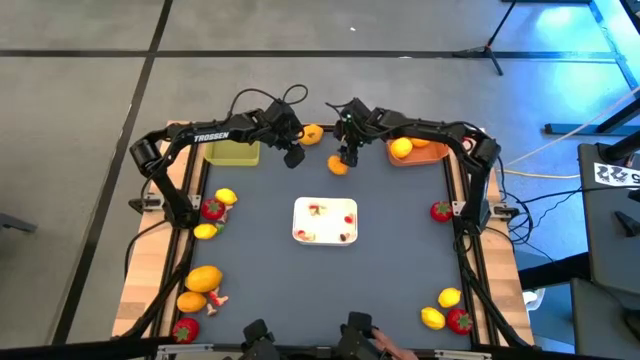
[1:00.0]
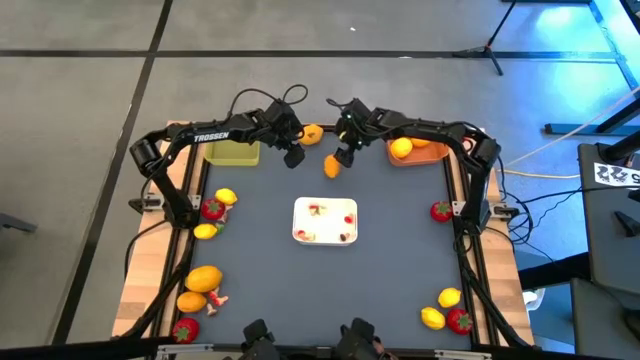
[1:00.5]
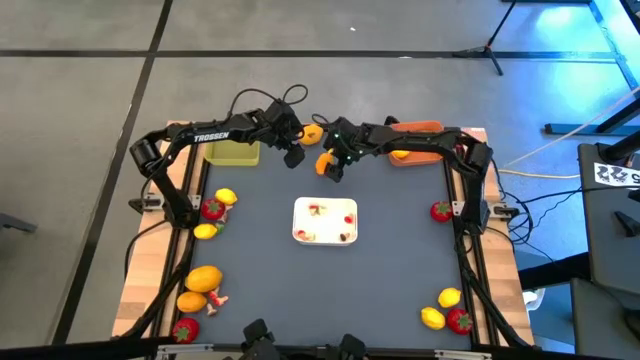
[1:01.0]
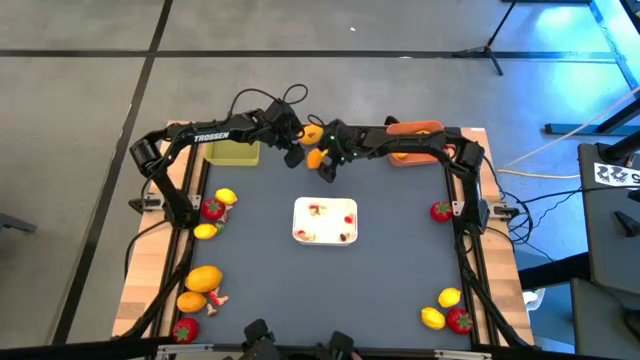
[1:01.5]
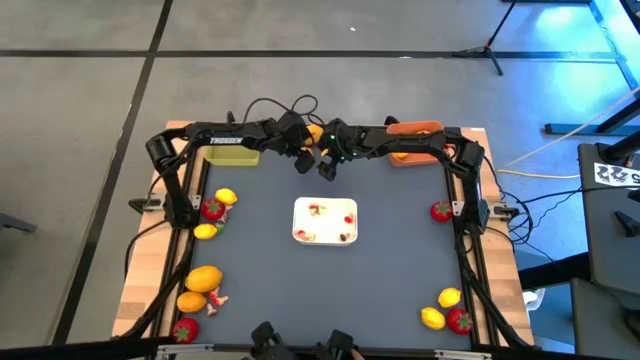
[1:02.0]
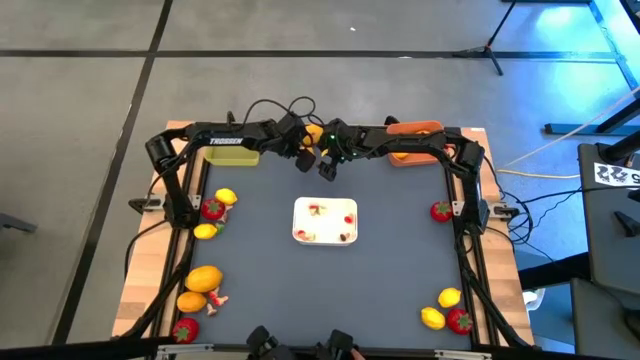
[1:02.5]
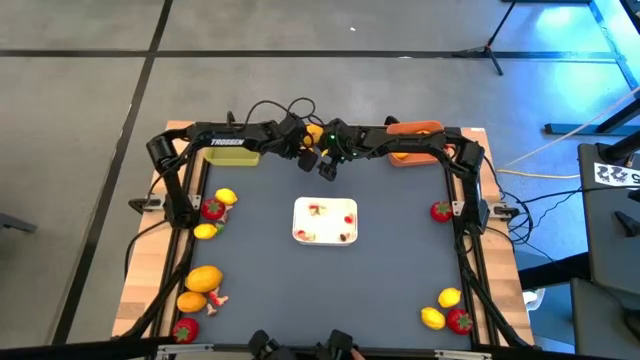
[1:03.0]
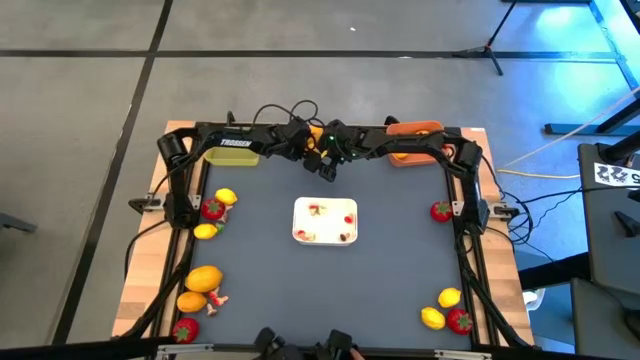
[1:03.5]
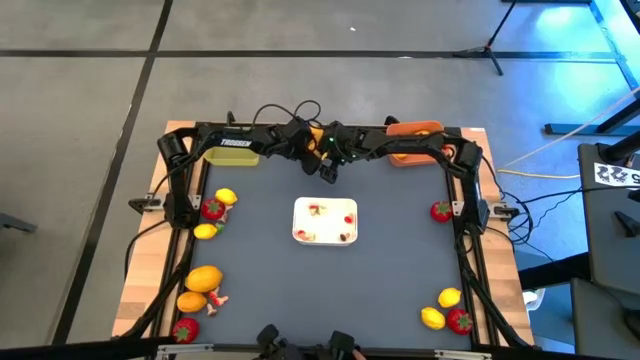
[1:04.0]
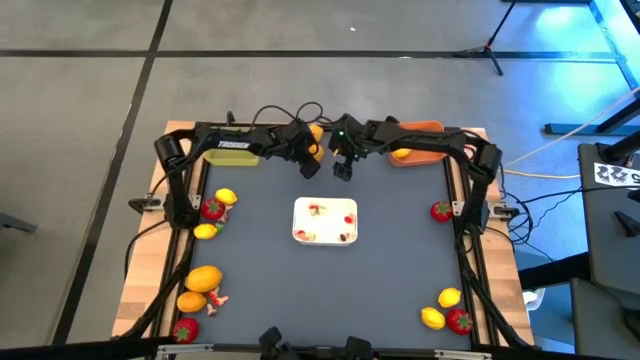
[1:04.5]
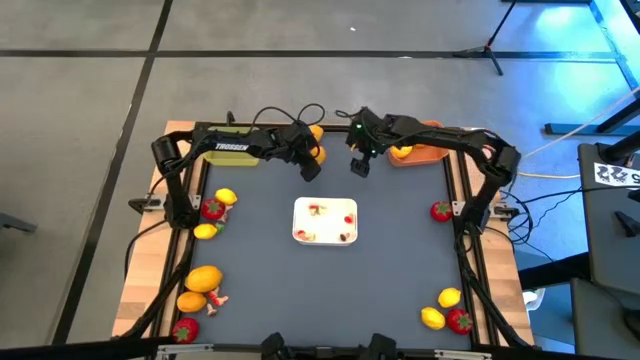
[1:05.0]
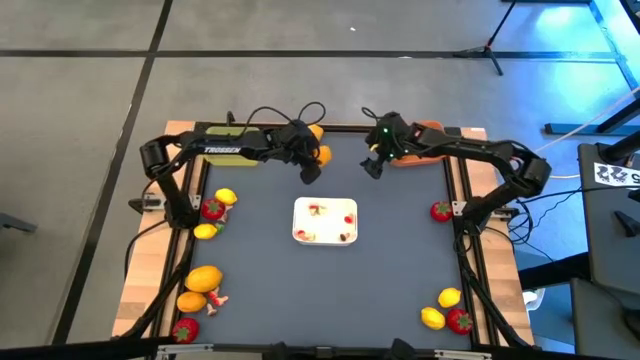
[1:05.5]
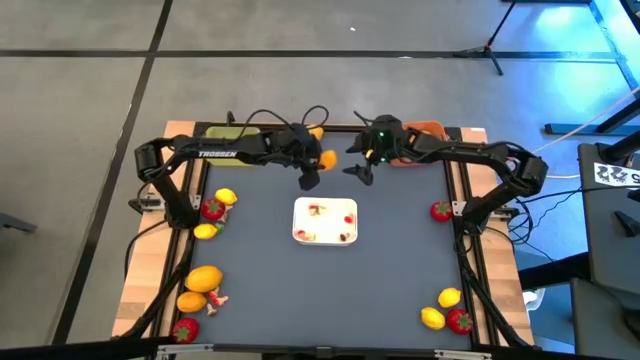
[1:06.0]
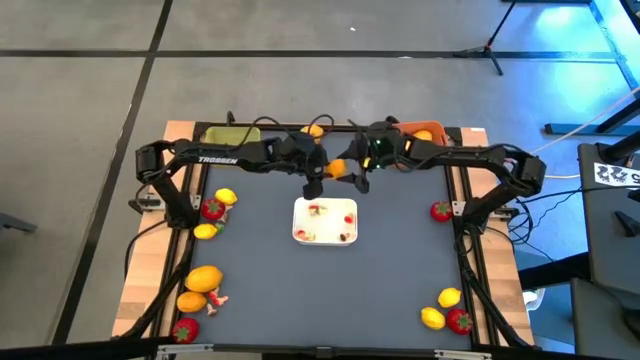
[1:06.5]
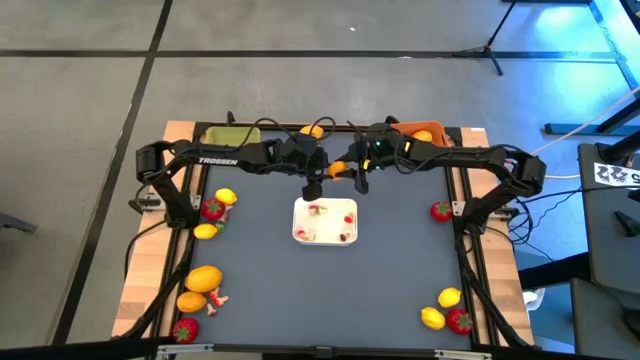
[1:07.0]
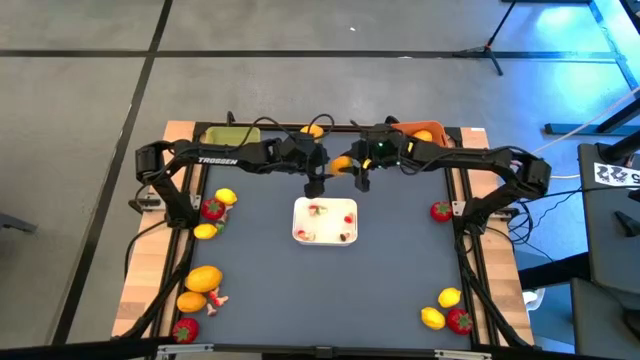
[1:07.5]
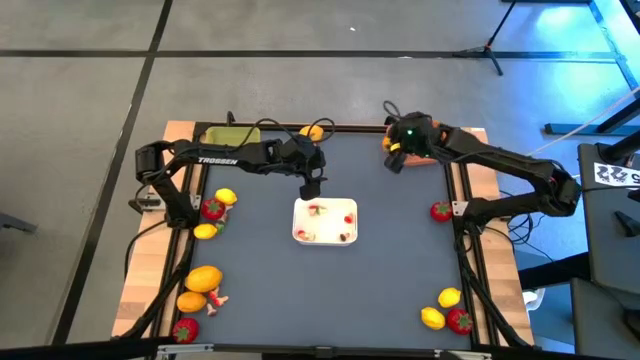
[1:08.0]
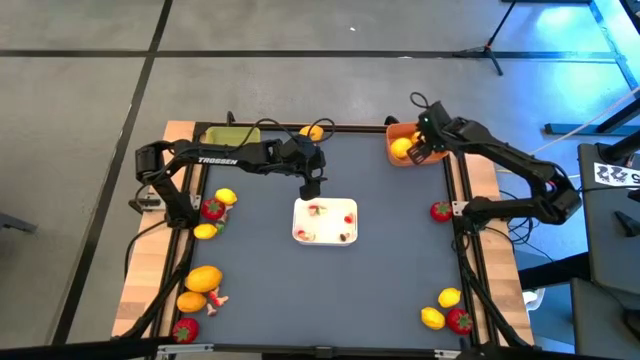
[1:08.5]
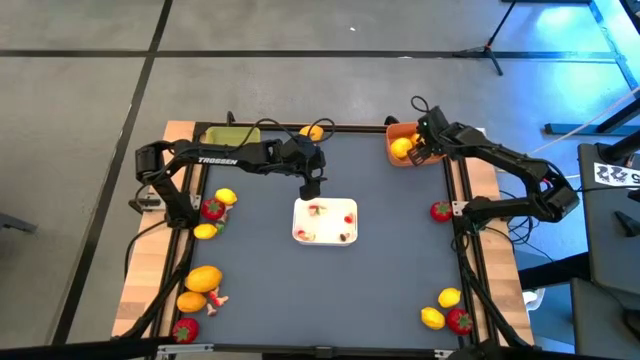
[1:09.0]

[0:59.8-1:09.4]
Task: Sort produce into baskets
Put the yellow lemon into the orange bin

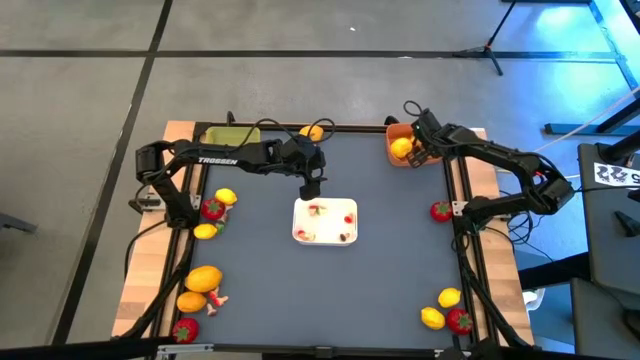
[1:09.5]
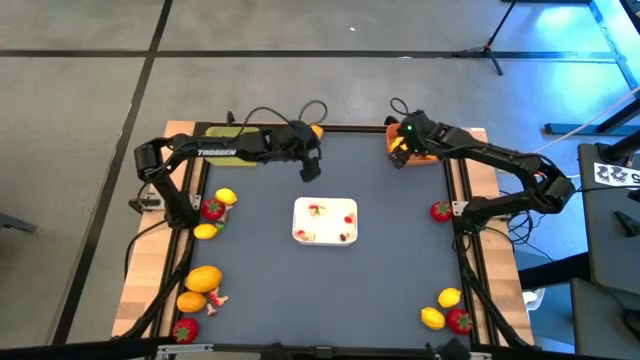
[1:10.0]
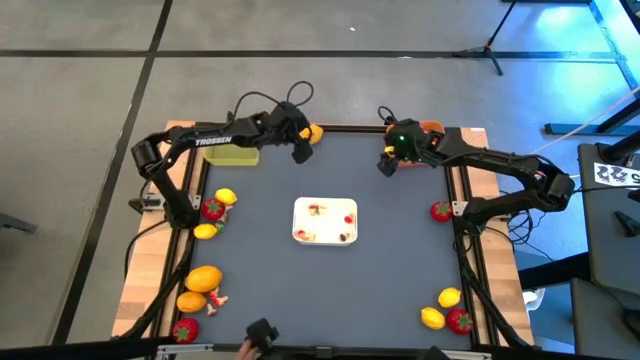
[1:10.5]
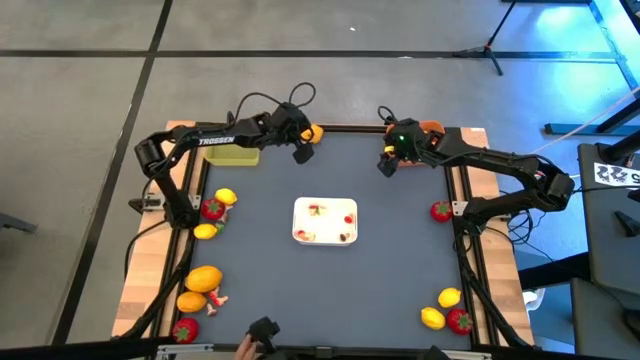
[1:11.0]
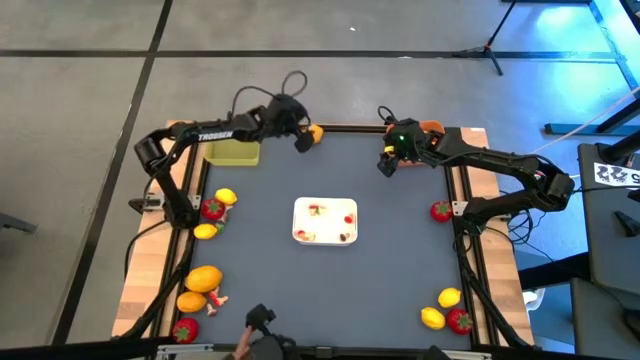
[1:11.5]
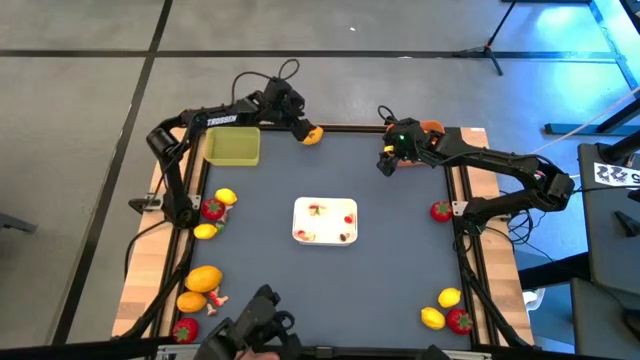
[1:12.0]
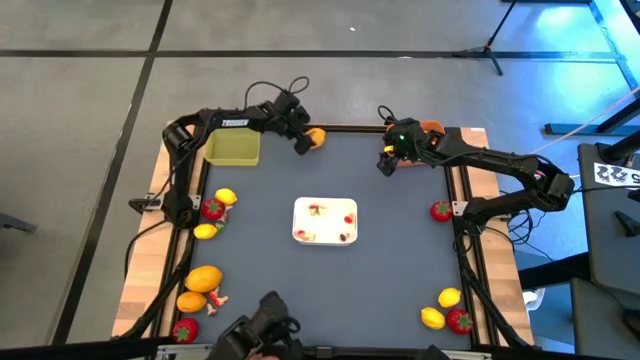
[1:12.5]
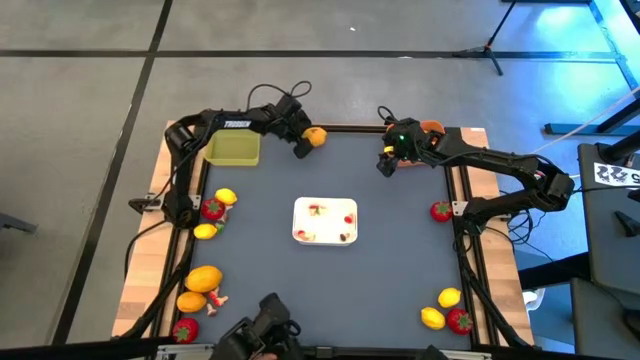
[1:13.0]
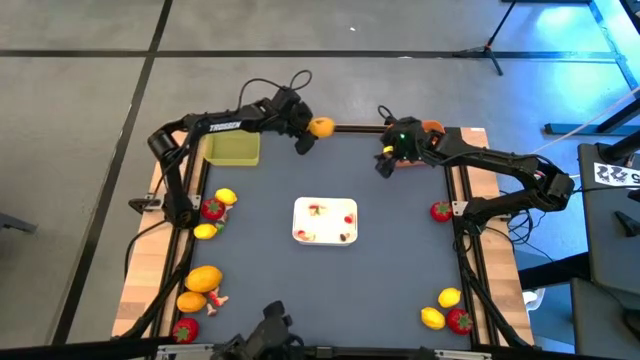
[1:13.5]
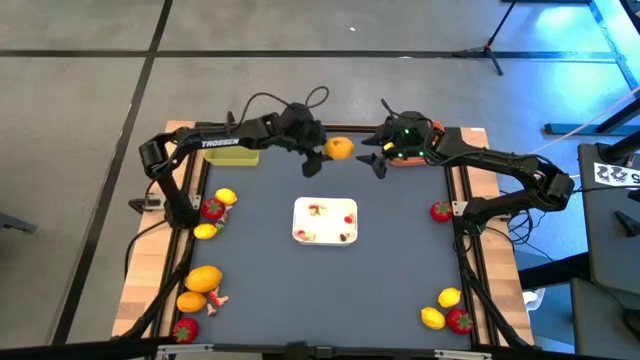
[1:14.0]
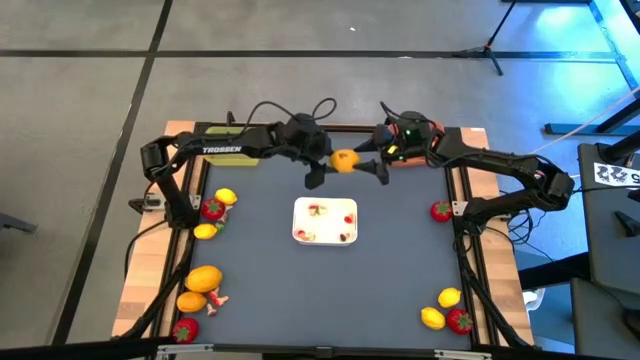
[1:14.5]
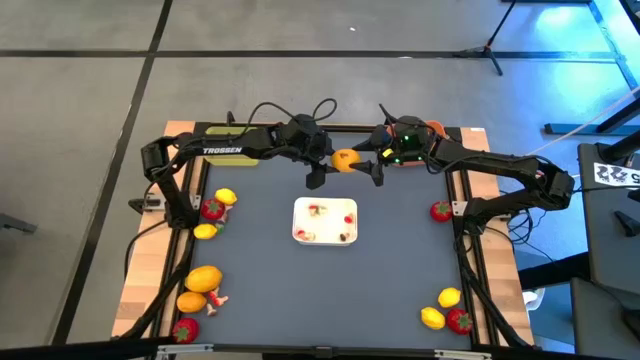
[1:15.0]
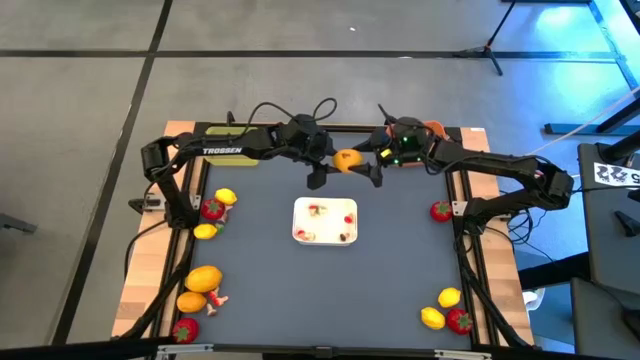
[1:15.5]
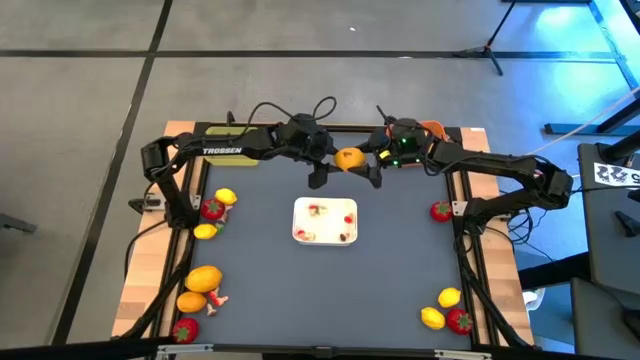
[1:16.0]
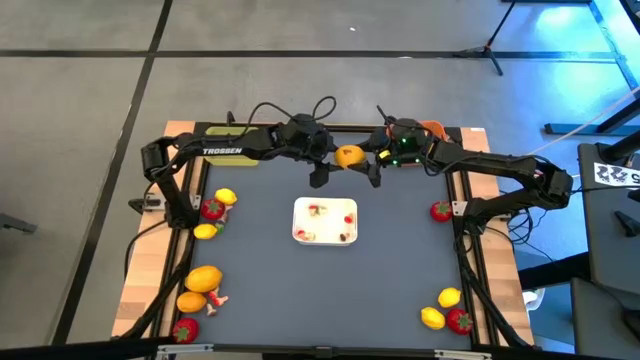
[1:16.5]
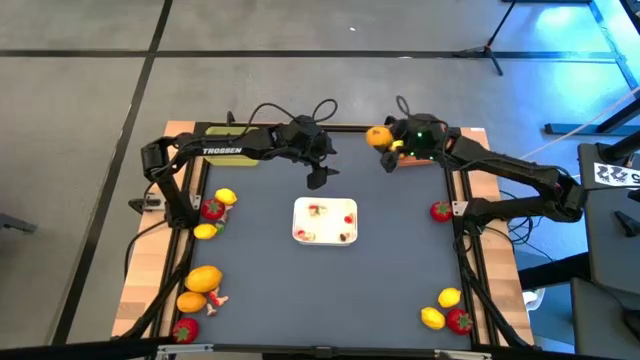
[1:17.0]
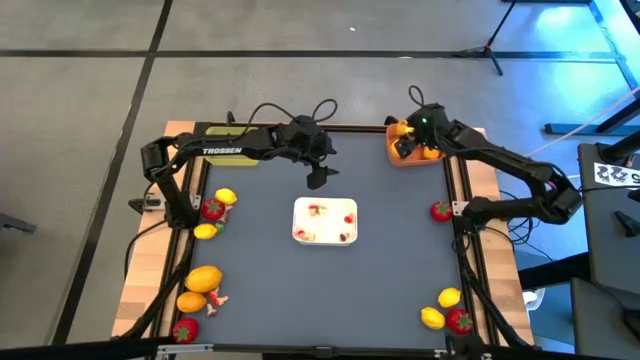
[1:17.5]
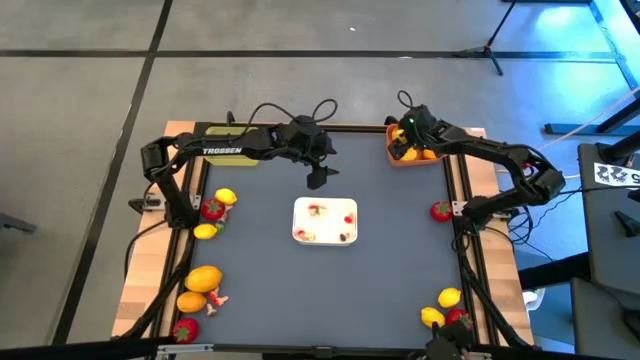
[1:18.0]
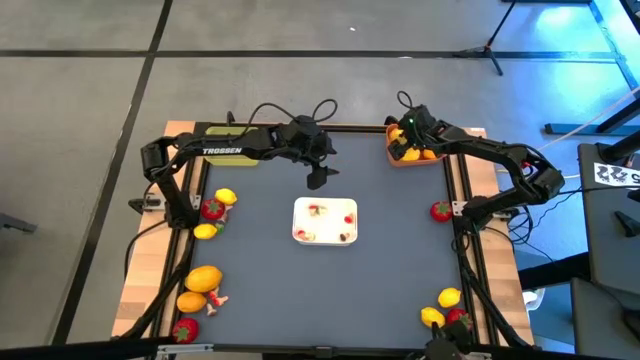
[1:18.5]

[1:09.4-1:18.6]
Put the yellow lemon into the orange bin

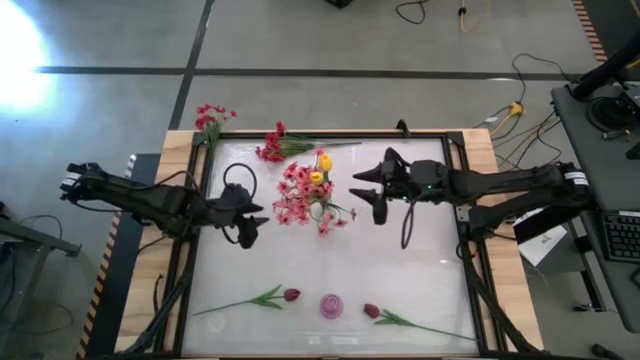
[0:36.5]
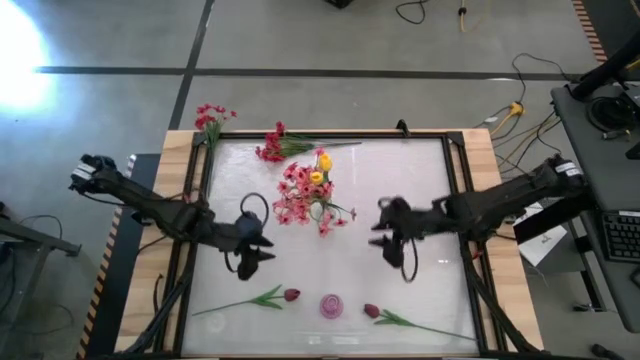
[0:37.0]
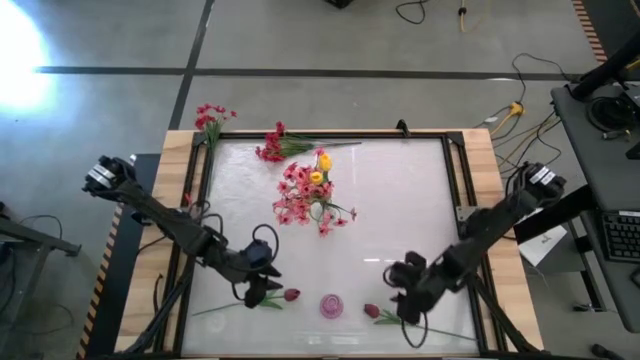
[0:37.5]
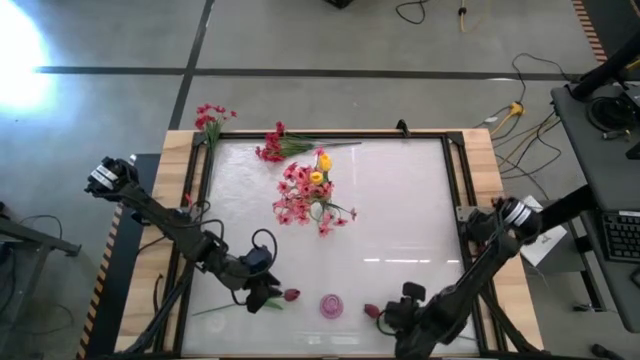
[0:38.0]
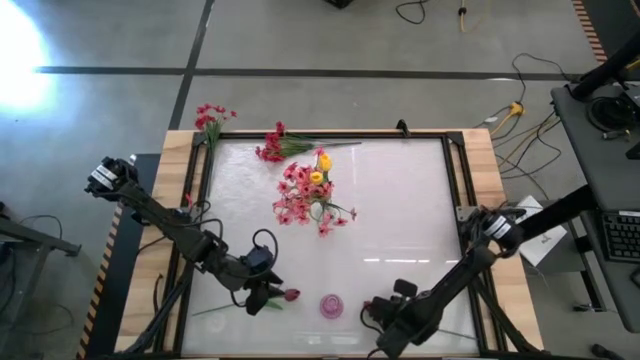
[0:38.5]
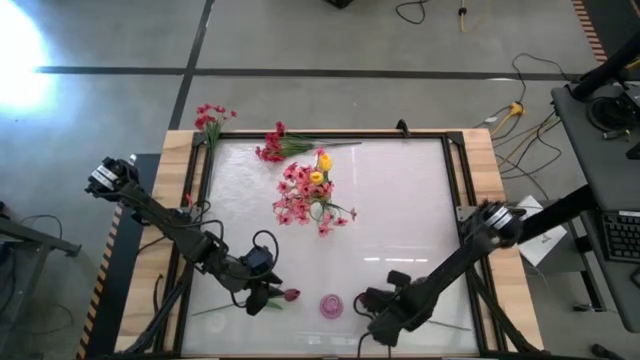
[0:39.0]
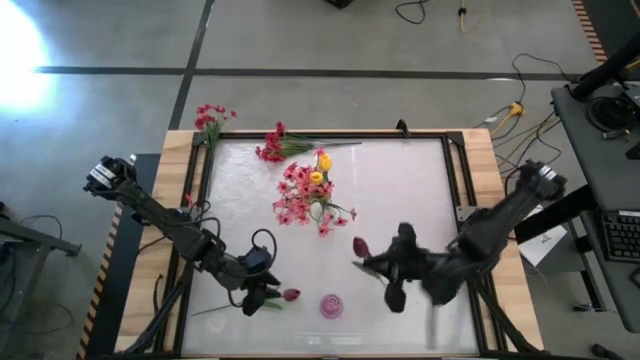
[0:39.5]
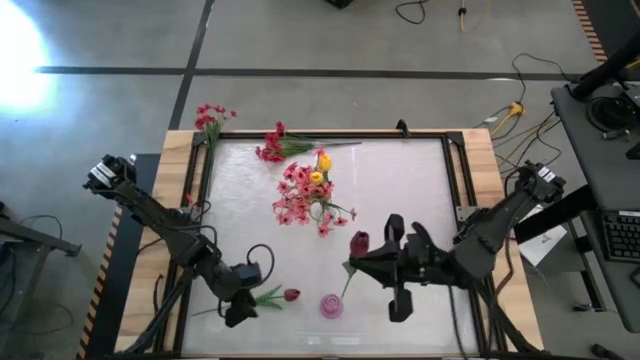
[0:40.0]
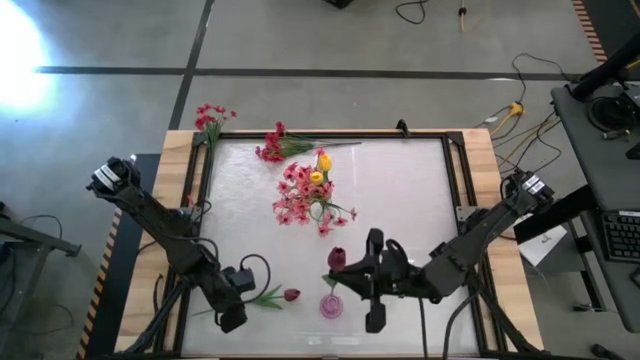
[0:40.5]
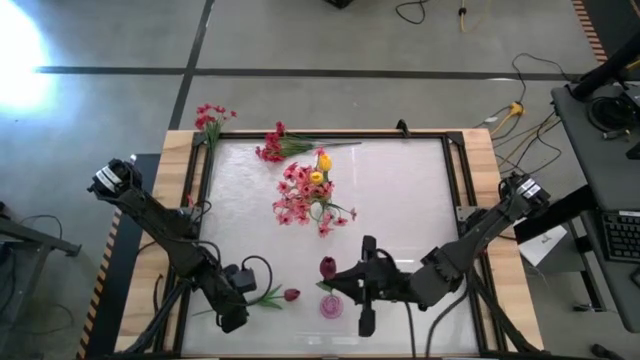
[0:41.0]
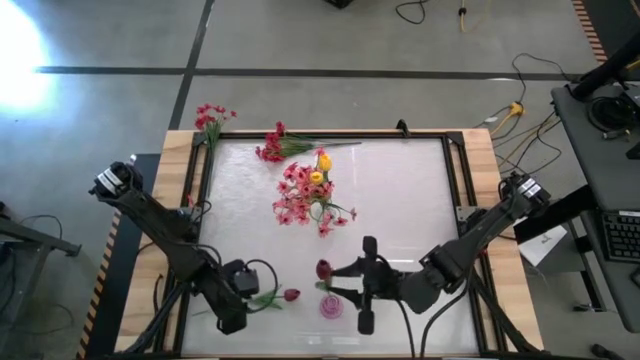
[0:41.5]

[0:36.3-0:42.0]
Task: Sort flowers into vase by color
Put the right dark red flower into the purple vase
